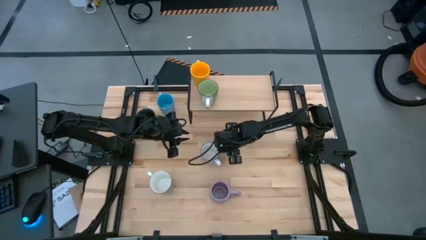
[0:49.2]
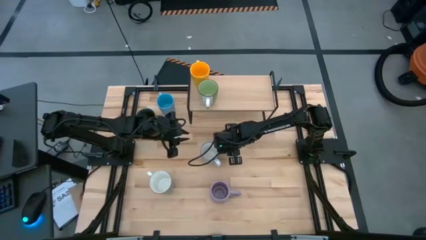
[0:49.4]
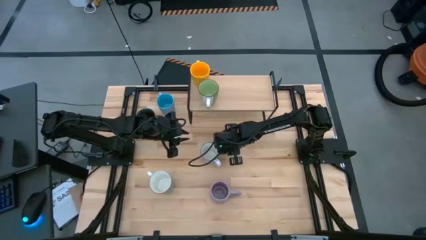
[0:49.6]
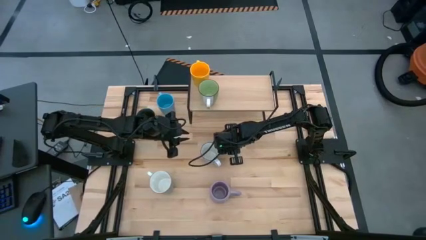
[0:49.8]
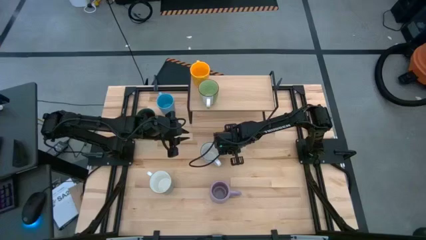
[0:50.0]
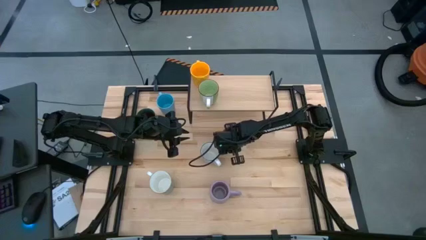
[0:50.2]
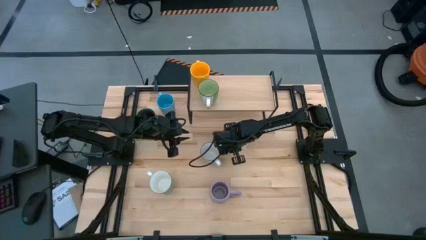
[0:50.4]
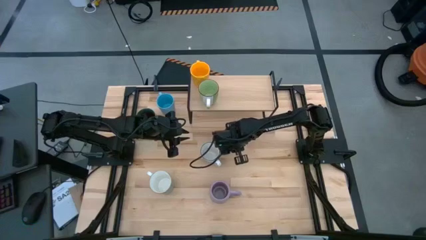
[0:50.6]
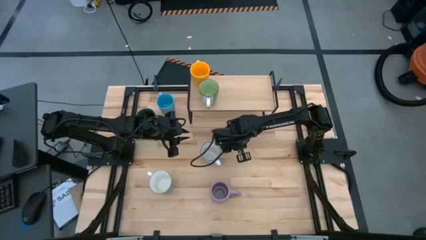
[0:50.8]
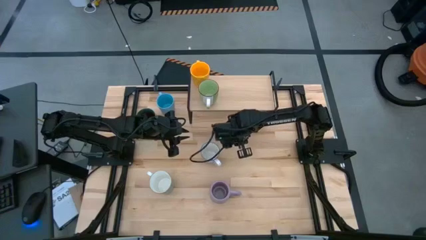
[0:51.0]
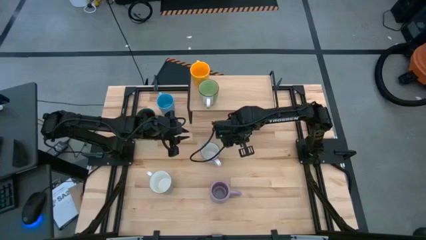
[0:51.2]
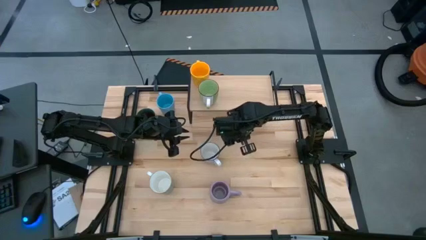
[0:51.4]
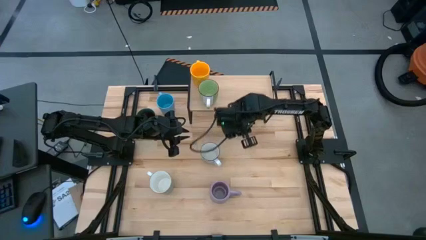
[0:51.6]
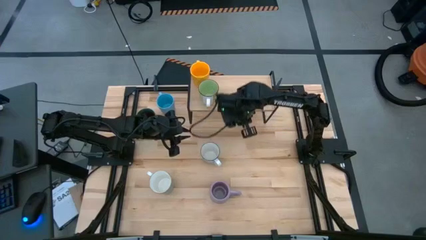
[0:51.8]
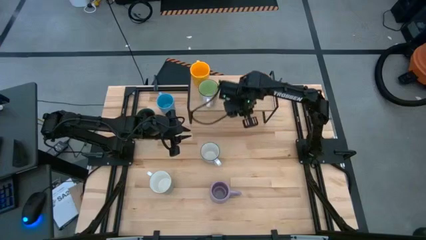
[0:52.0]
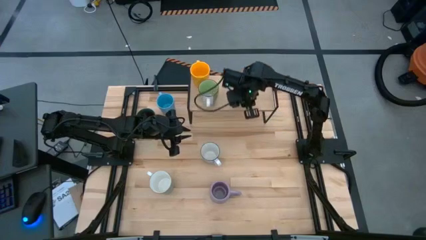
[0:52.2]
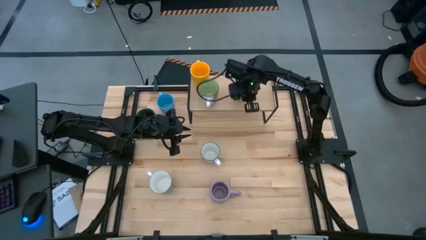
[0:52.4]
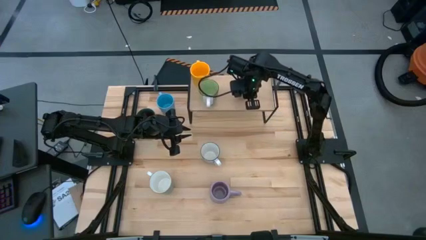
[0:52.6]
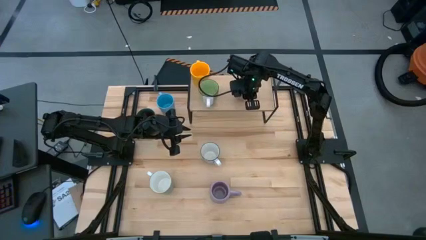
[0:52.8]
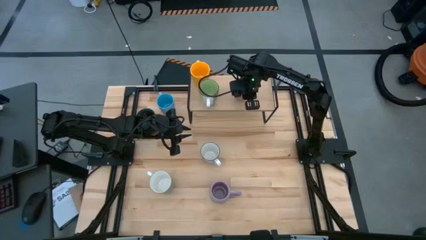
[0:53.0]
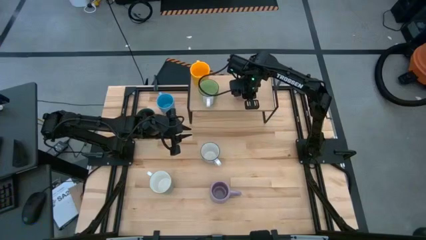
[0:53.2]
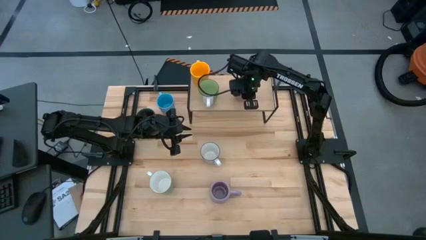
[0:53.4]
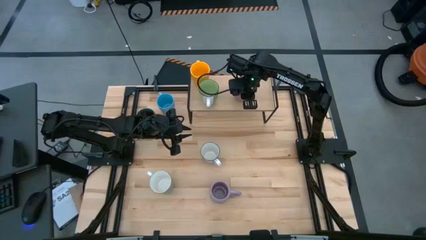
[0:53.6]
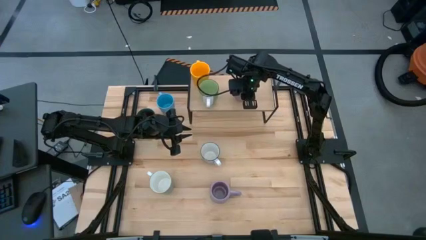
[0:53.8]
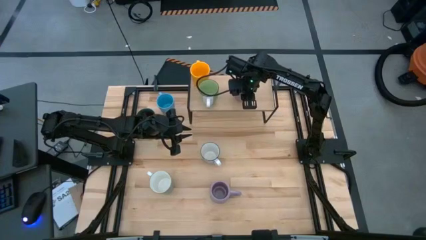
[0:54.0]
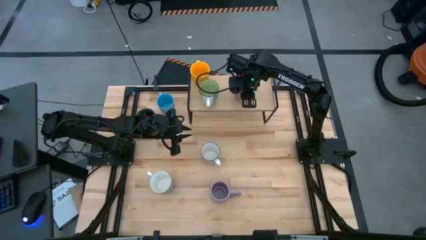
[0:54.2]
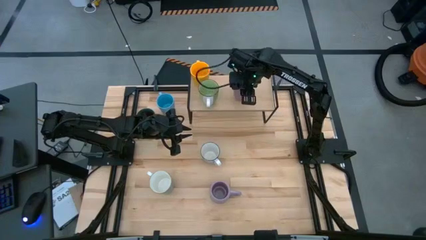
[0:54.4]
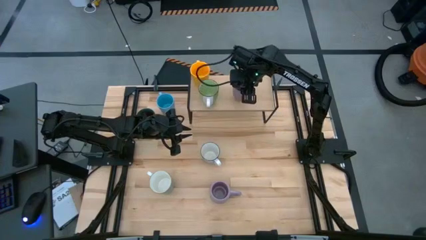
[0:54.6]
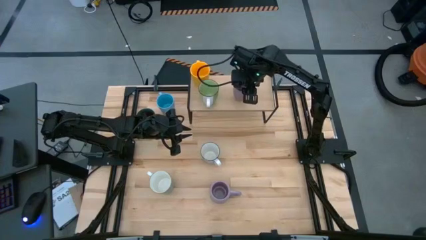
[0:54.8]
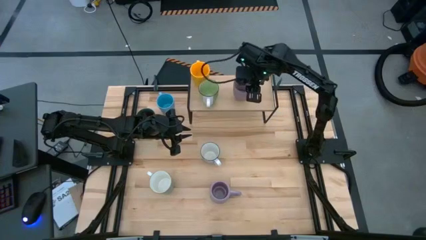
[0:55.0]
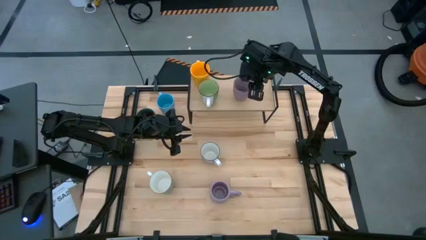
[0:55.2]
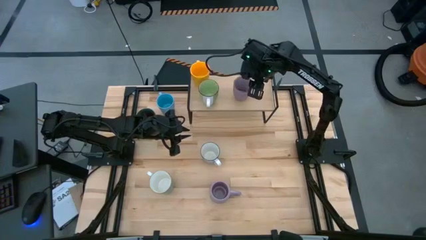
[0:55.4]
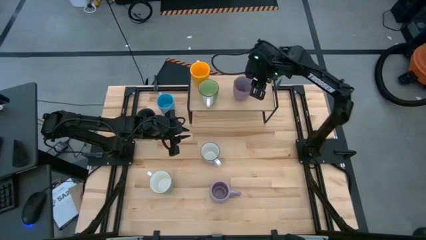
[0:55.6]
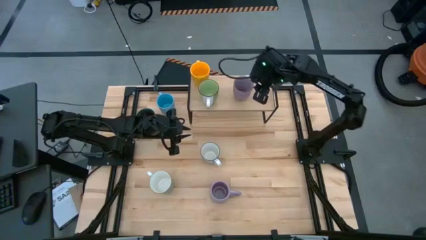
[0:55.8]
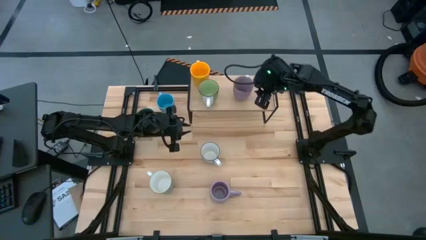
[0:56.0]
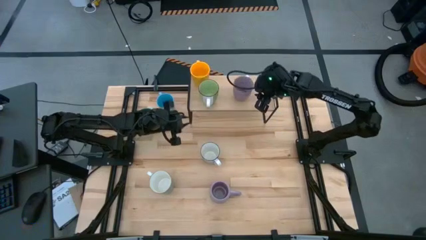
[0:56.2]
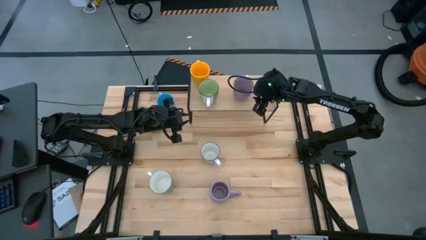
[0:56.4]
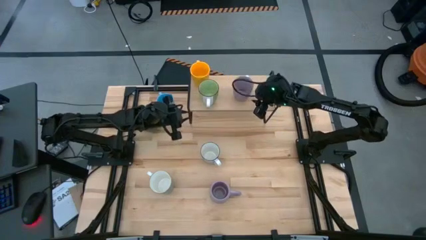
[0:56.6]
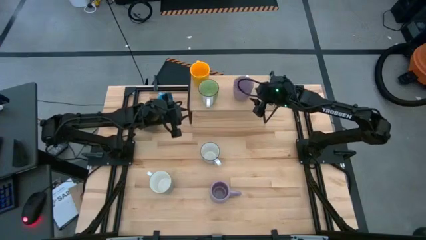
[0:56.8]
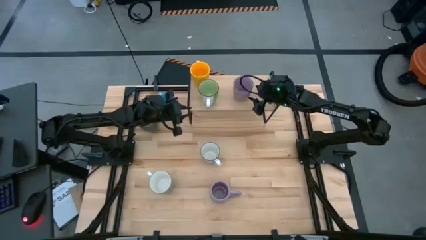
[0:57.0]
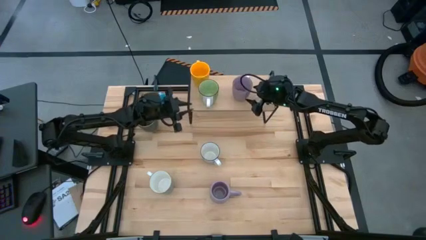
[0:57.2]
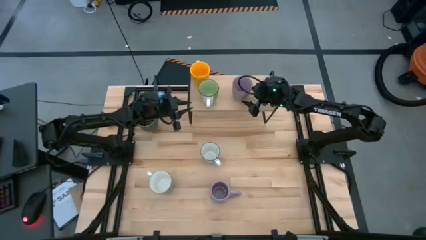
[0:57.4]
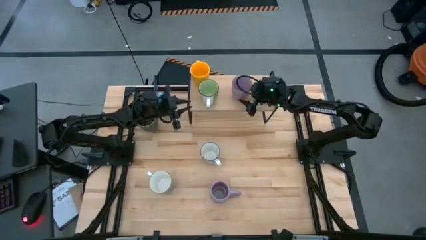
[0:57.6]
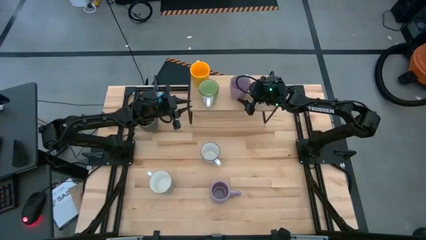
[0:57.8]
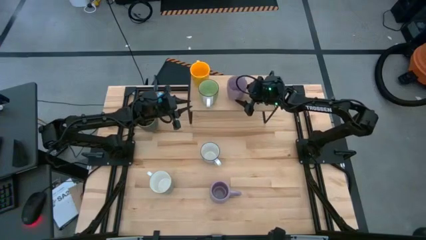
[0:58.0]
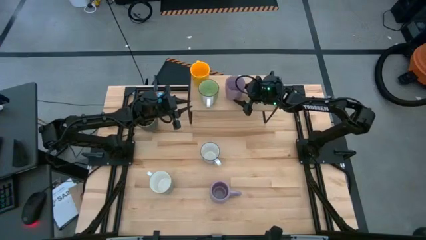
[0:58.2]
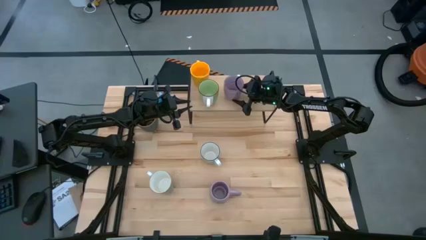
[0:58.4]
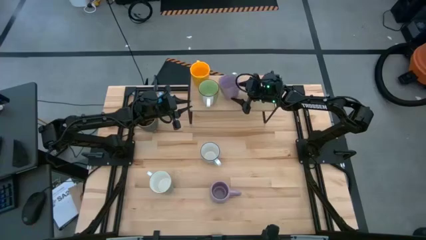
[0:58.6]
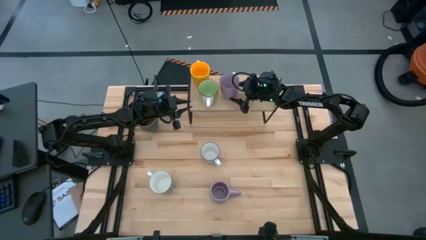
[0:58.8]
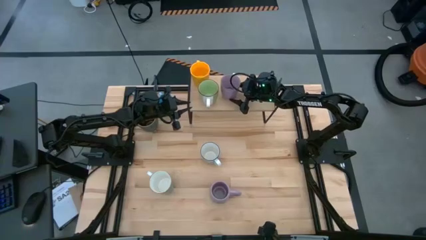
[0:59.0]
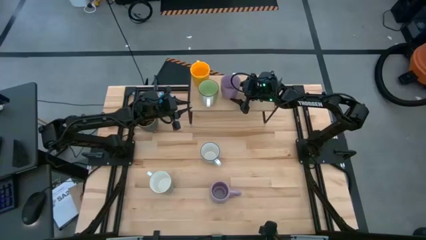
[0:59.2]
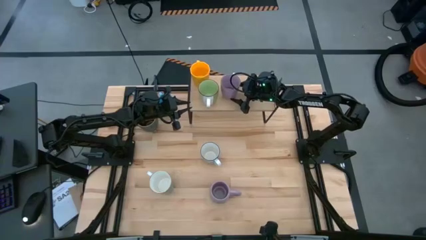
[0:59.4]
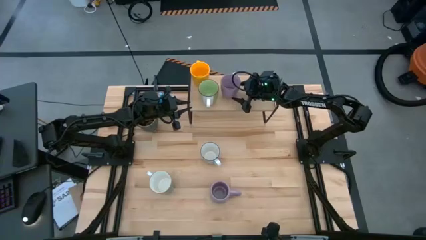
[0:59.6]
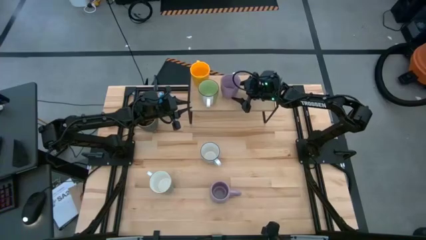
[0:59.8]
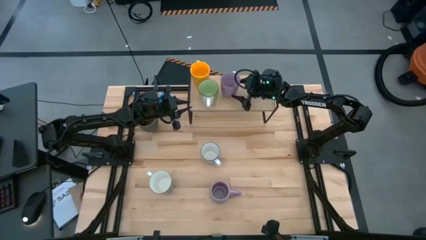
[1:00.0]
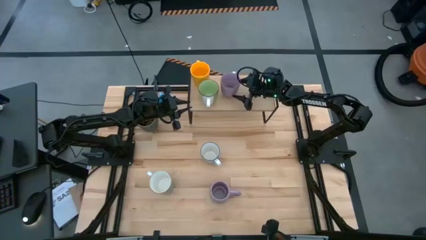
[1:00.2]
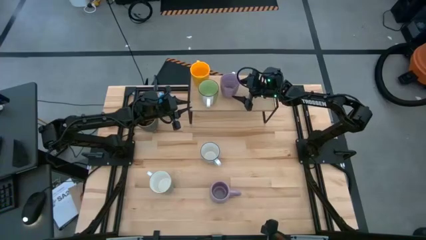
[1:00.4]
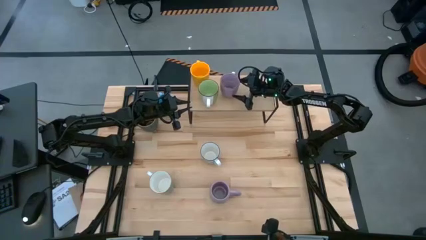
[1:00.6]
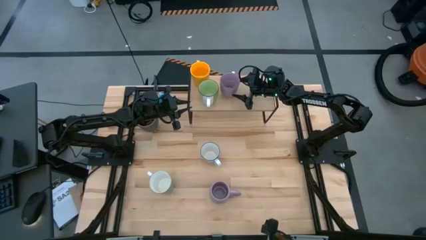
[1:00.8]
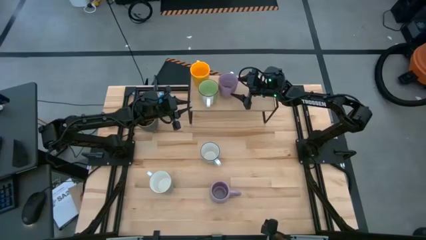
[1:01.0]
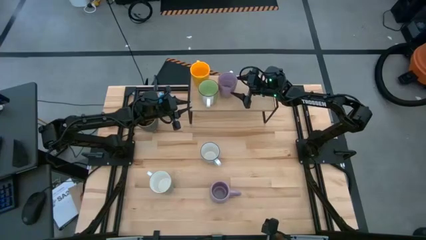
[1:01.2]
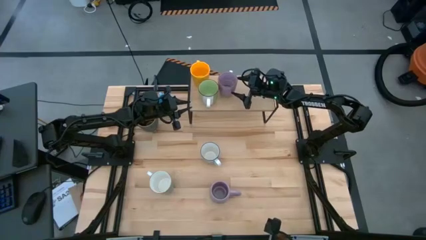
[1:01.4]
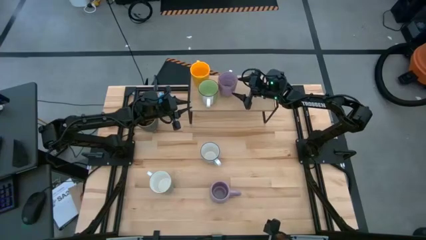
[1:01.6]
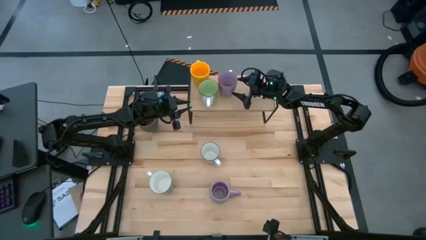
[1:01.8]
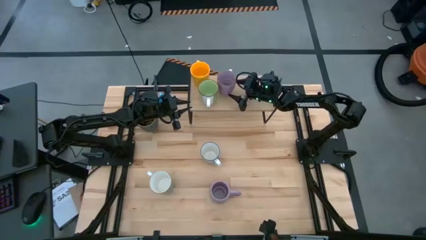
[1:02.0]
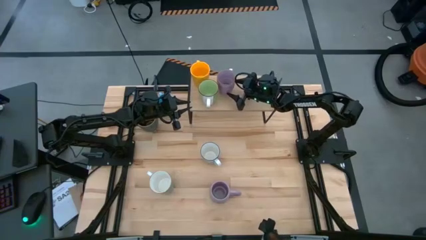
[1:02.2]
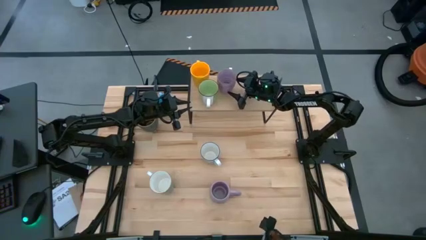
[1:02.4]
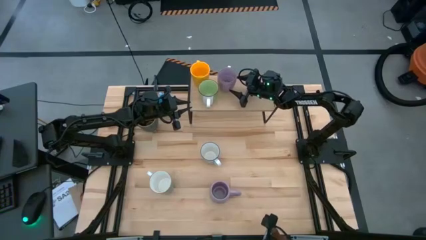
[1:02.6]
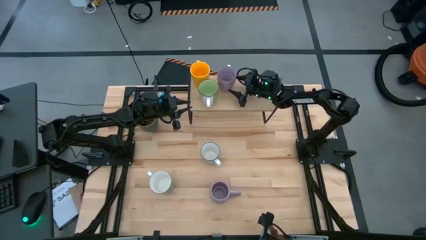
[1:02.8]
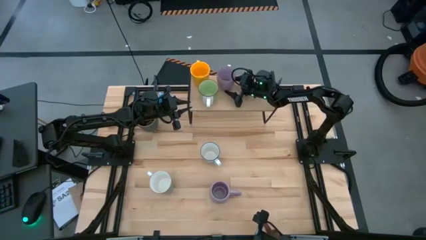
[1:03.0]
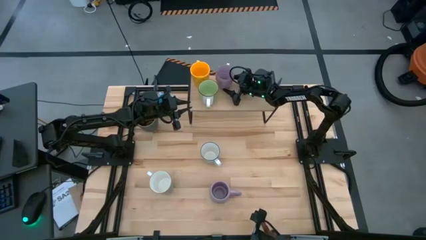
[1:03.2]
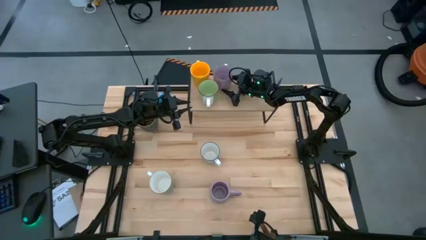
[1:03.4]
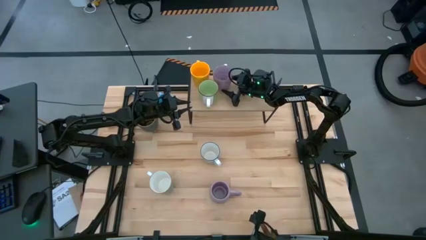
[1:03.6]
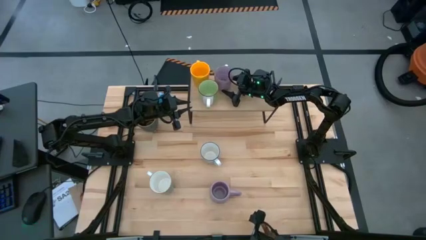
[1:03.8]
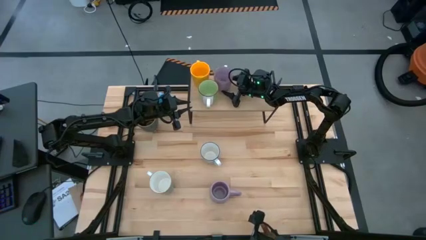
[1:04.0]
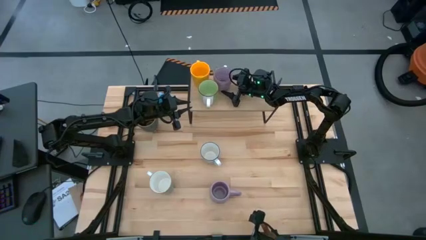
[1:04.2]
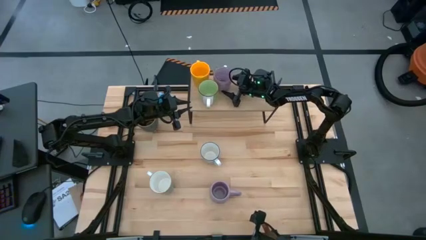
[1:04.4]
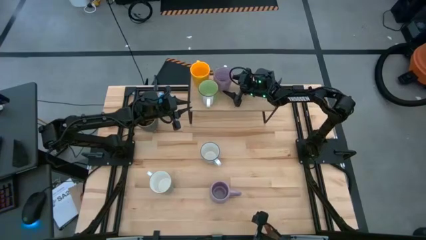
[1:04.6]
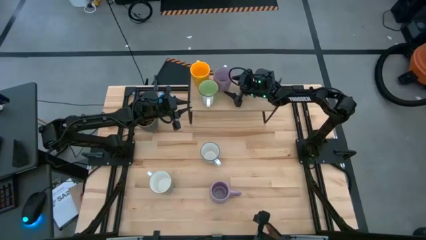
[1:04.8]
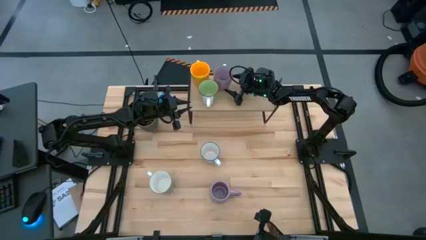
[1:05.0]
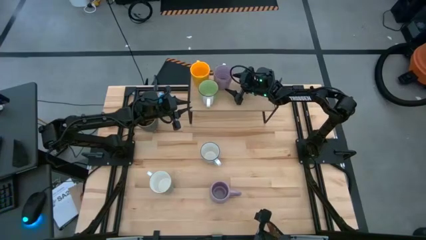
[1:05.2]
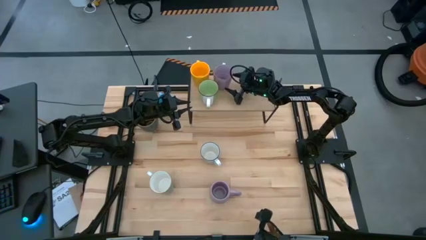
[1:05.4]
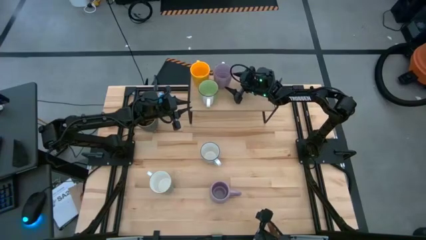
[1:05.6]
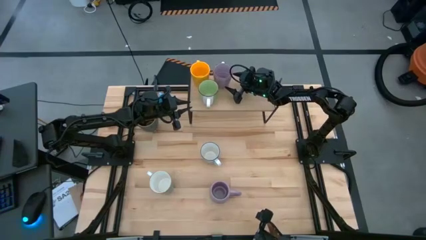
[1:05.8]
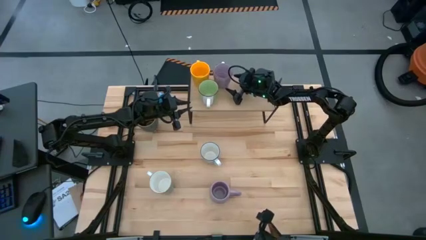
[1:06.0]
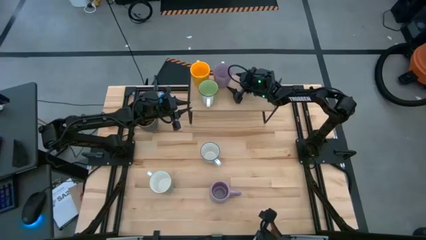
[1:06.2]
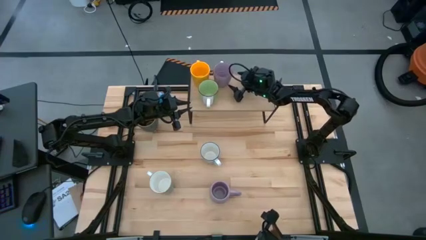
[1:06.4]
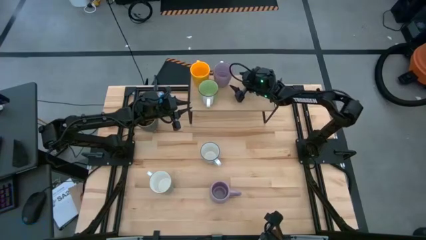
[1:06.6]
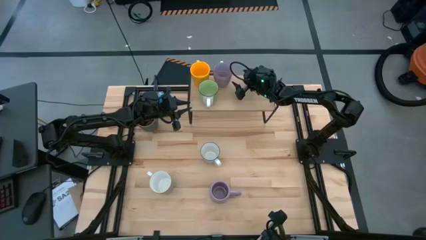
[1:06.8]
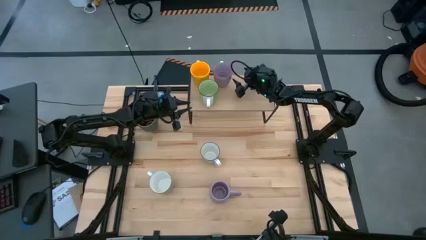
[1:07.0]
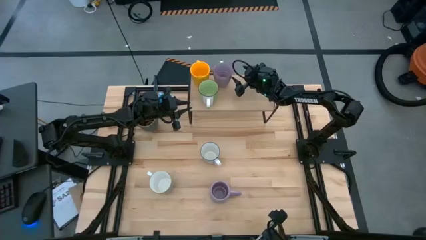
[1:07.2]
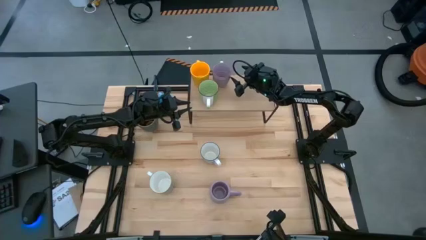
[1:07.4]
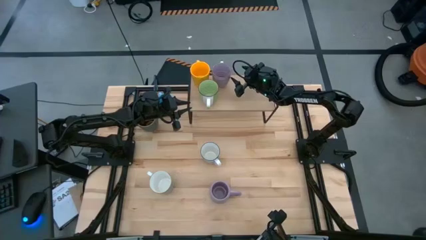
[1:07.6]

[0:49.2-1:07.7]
Task: Place coffee mugs
Put the top purple mug on the shelf
